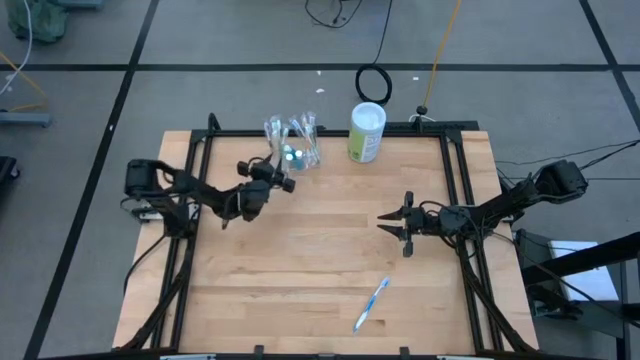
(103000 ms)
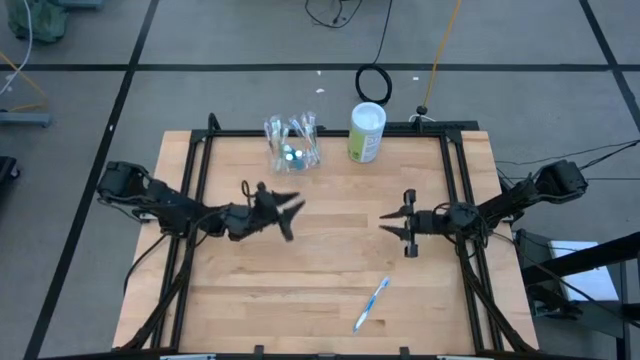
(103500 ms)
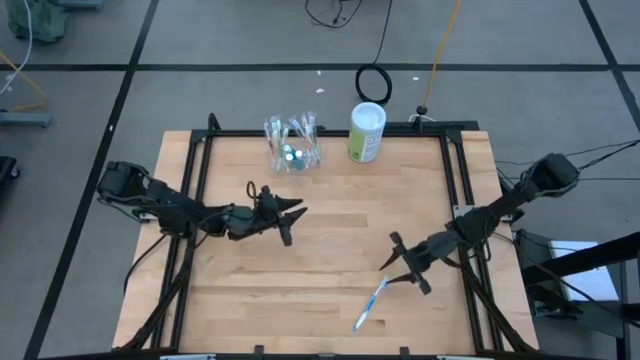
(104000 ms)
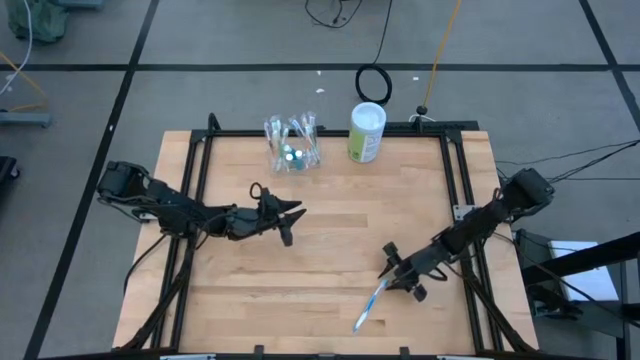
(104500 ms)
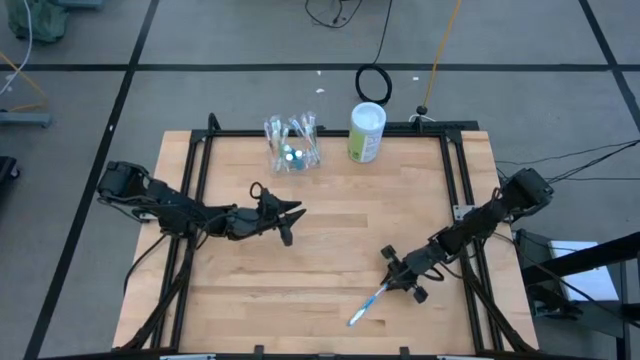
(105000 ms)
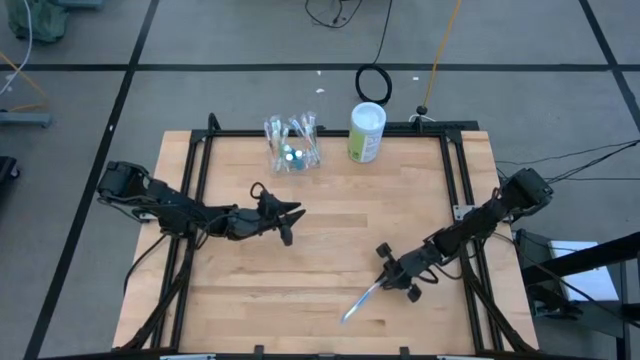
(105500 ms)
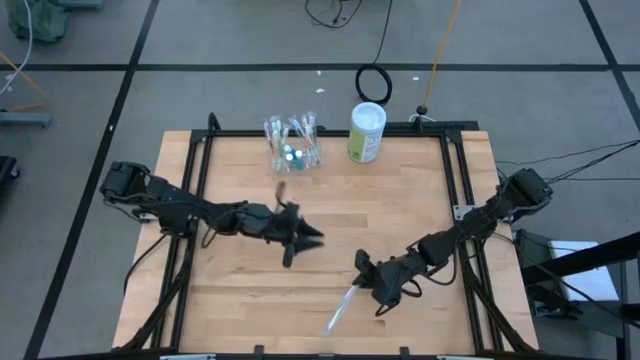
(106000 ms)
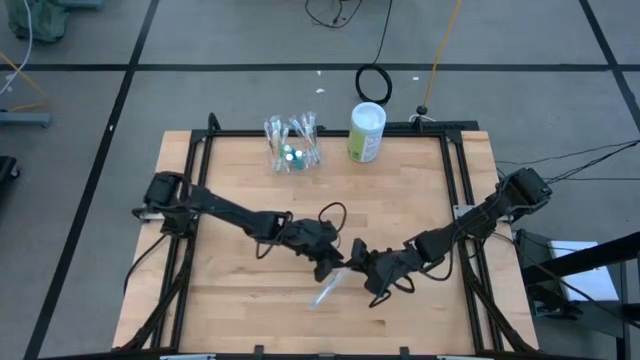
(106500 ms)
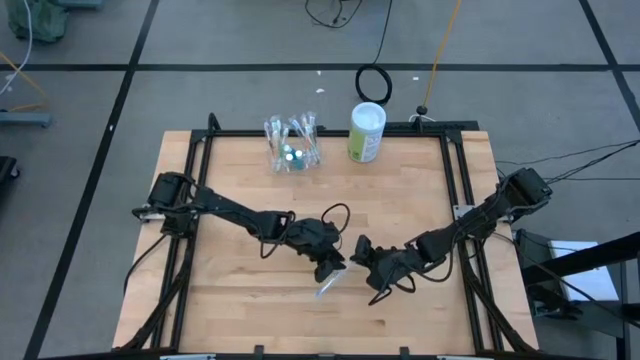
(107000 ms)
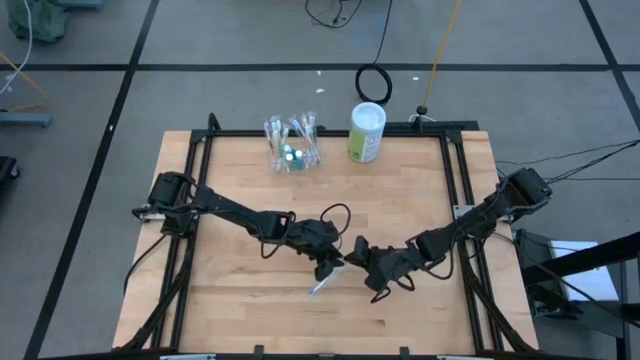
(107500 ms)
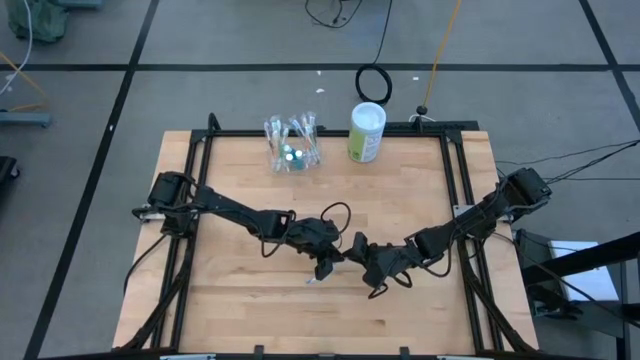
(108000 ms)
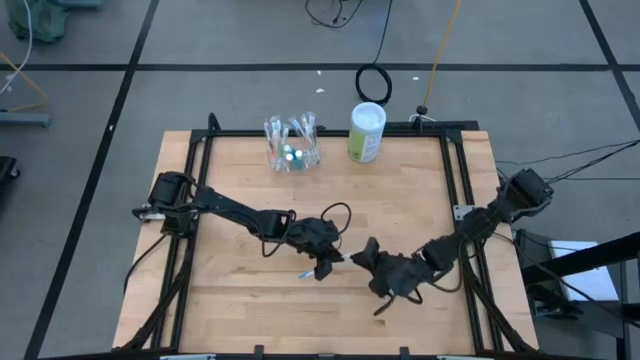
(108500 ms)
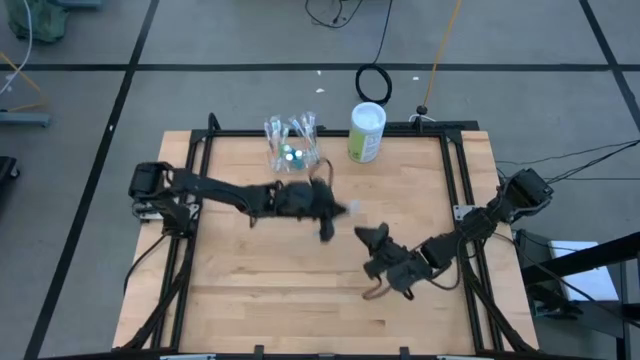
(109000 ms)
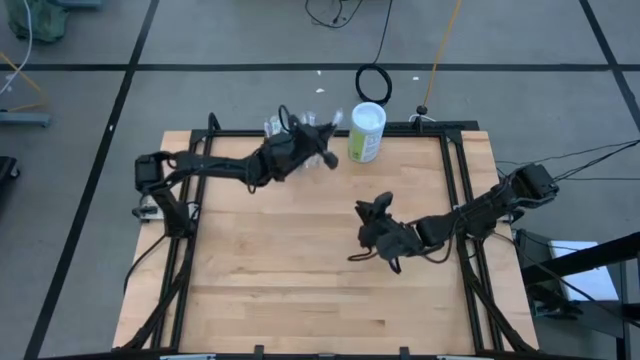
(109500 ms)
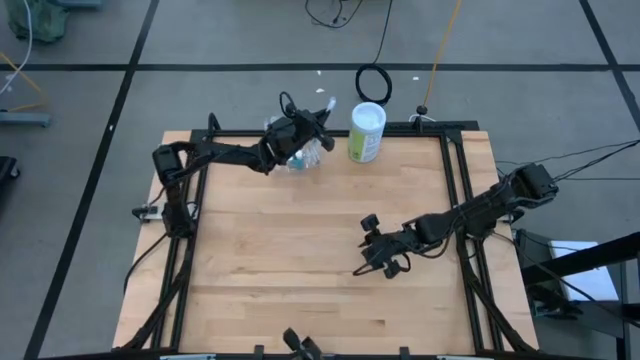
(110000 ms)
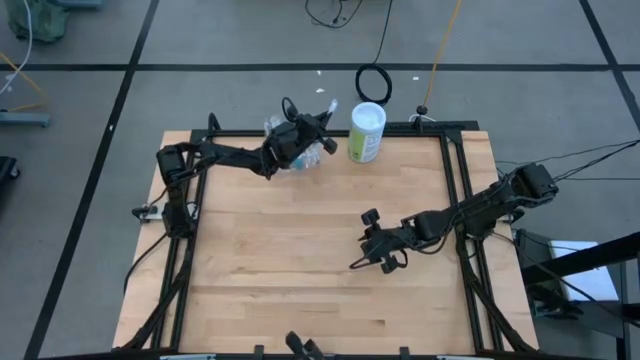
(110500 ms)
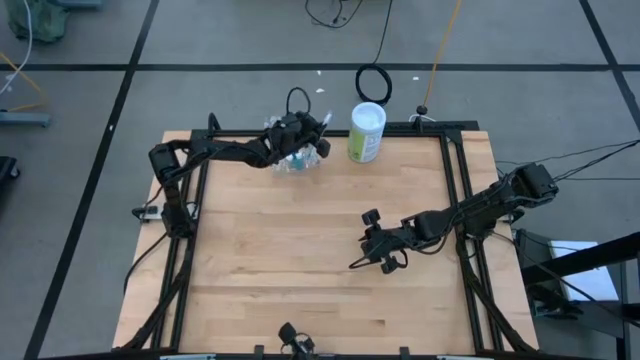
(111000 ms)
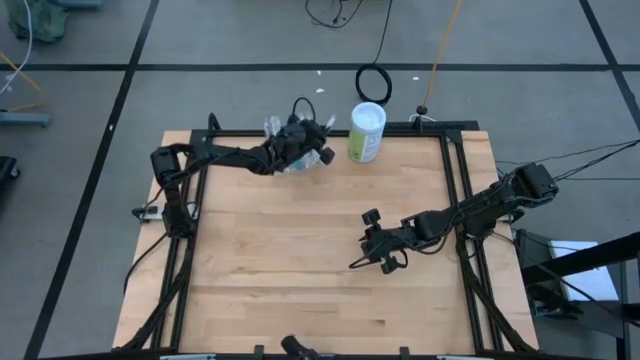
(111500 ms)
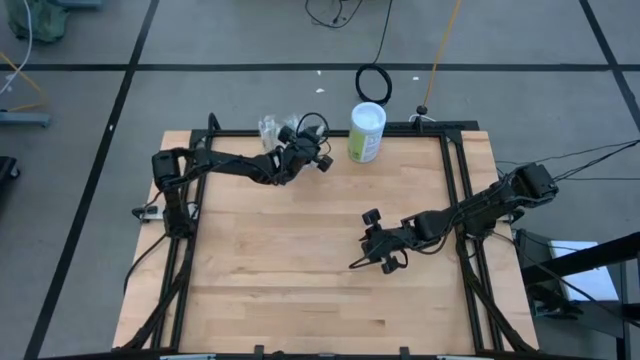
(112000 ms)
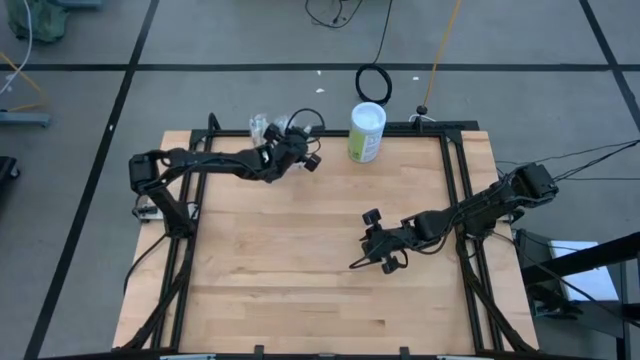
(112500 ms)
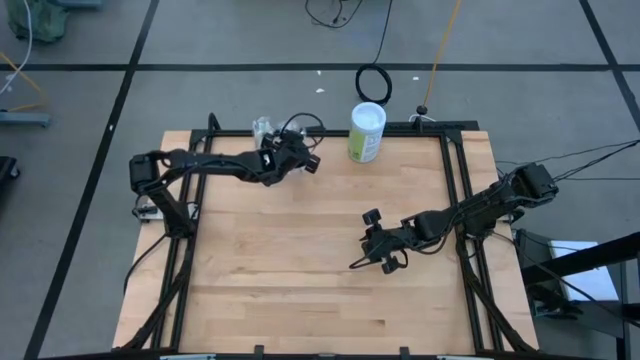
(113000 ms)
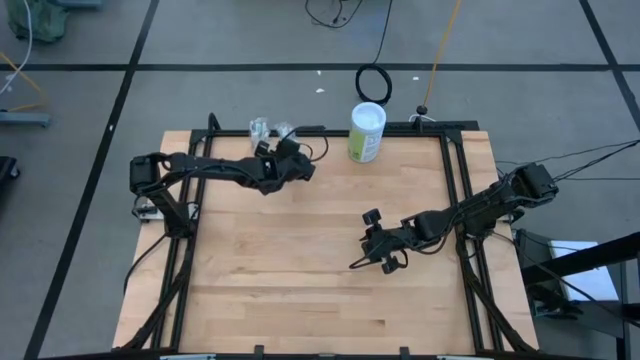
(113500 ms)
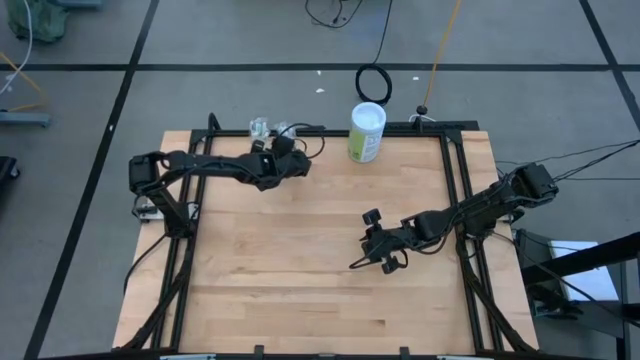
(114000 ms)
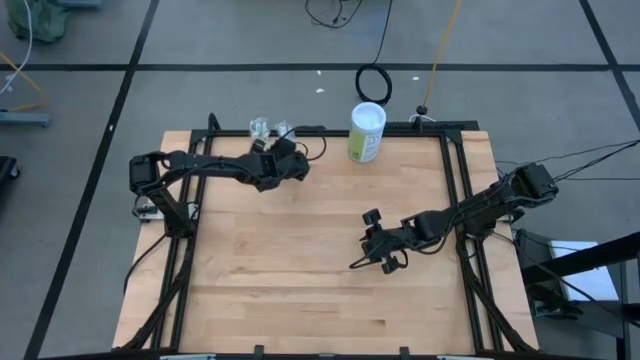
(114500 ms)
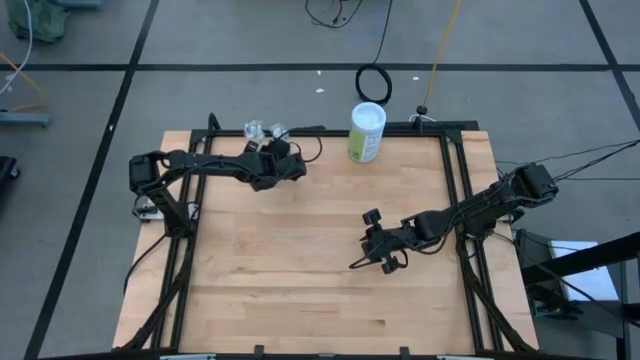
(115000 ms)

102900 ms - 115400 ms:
Task: Pick & Place toothbrushing station
Put the blue toothbrush into the transparent organizer

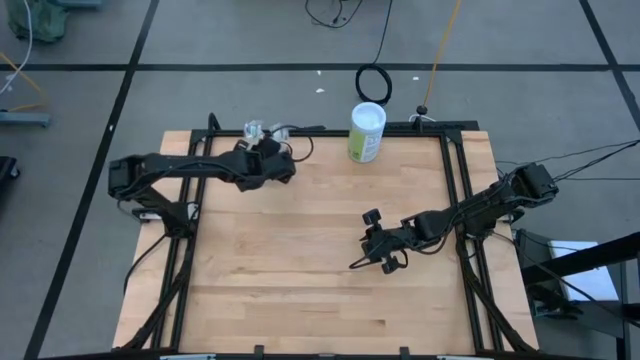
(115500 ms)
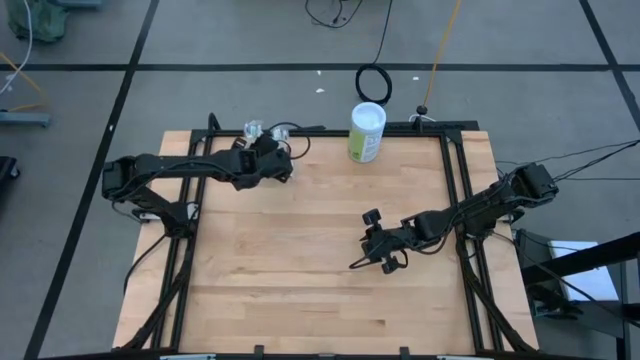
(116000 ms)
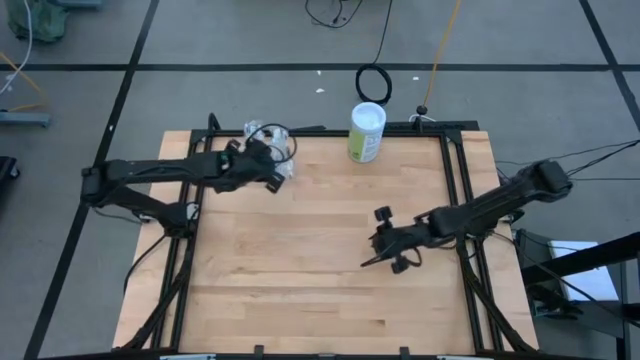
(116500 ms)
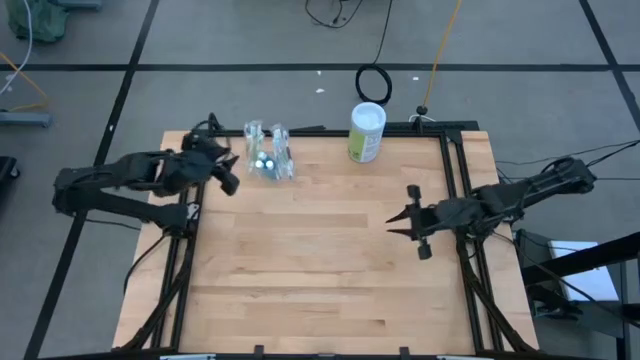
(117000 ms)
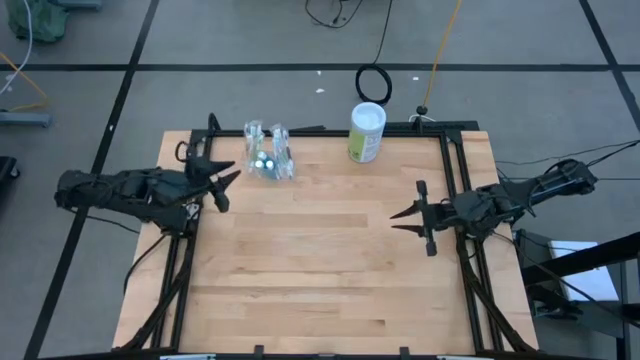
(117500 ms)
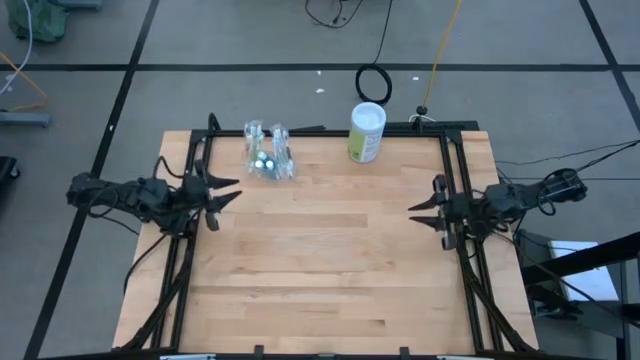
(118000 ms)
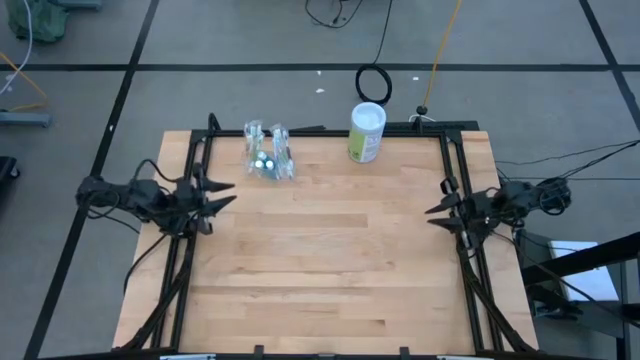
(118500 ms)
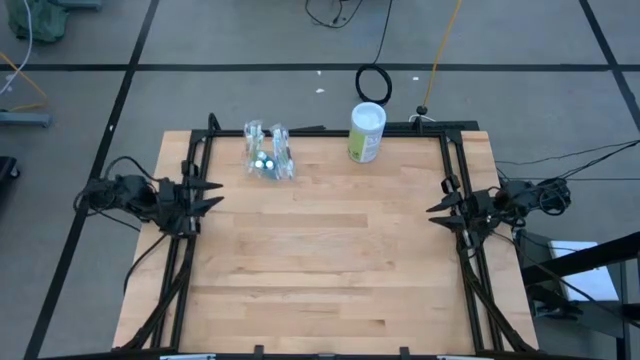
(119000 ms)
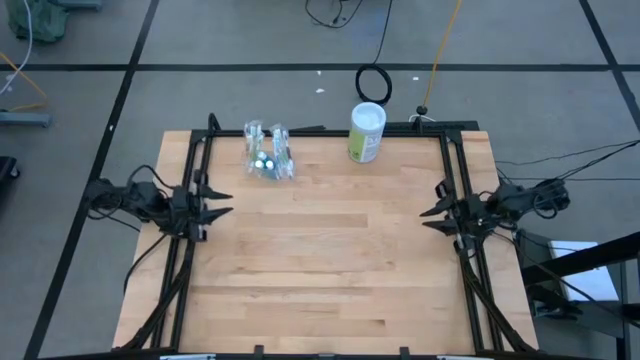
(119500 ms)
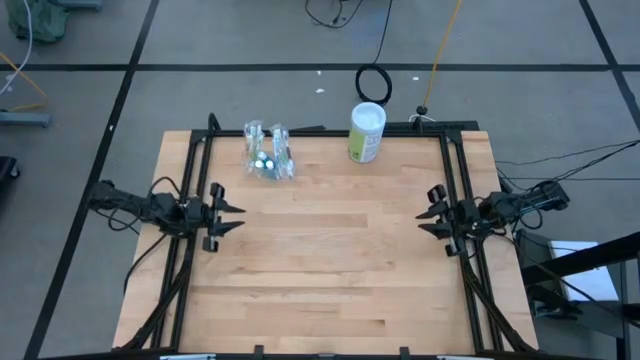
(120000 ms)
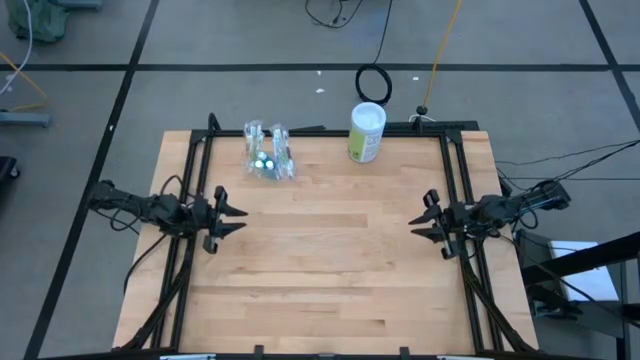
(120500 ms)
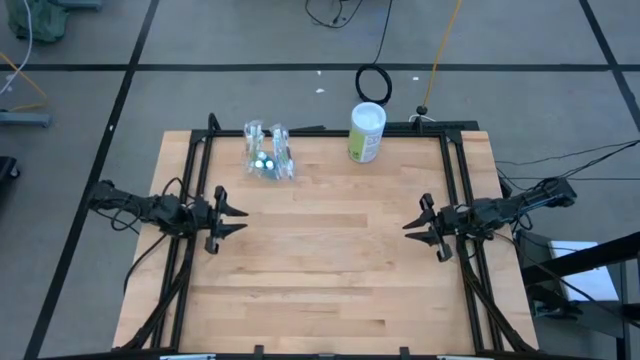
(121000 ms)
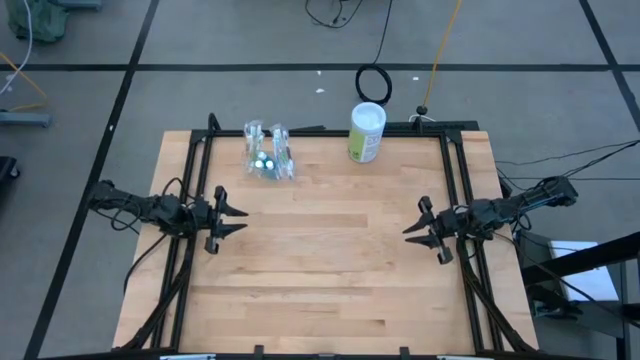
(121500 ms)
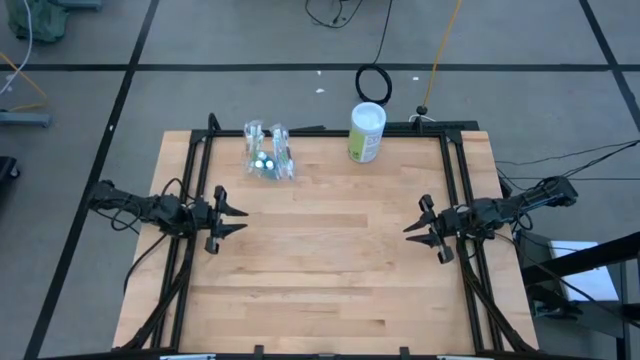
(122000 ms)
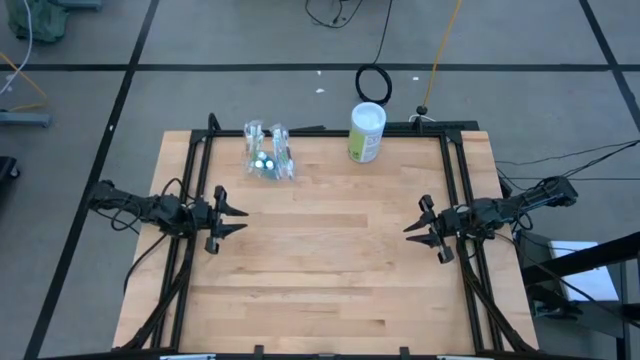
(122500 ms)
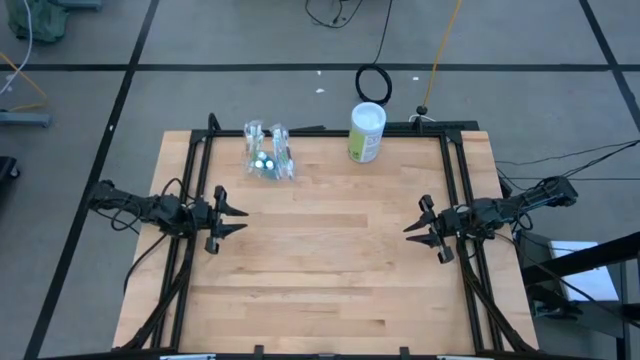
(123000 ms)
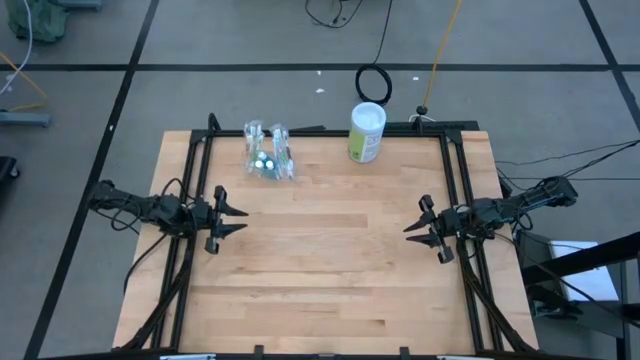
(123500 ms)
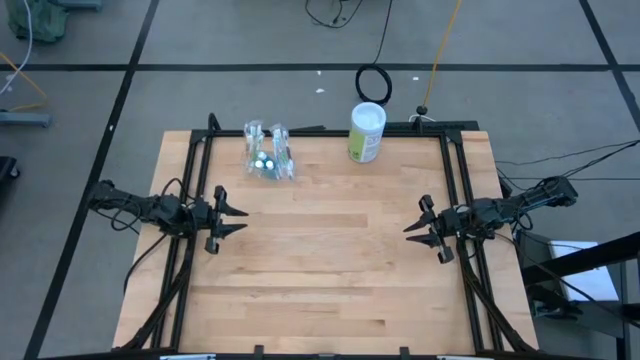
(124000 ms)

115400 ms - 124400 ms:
Return to Home Position
